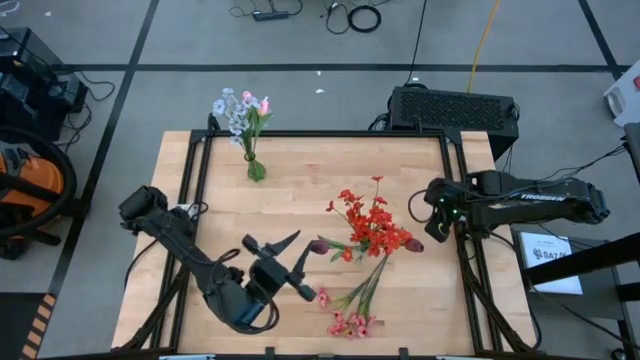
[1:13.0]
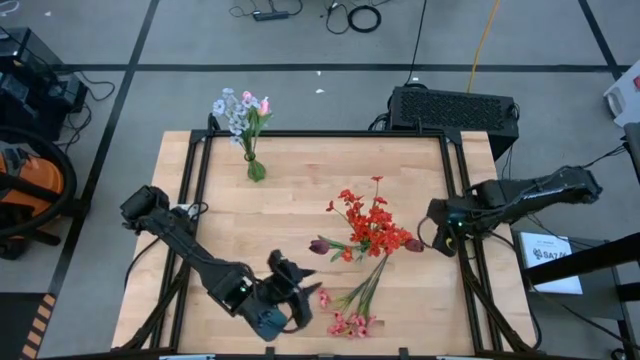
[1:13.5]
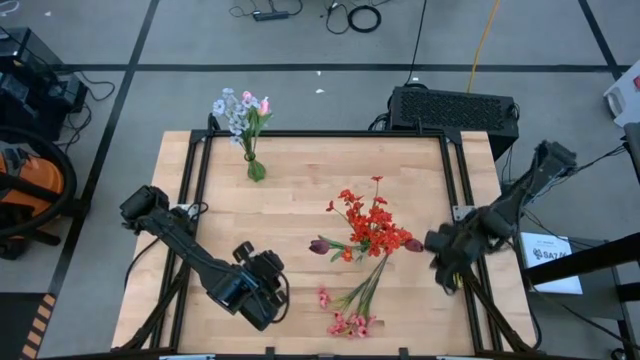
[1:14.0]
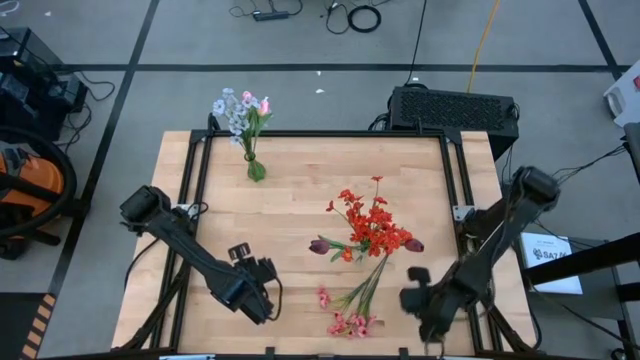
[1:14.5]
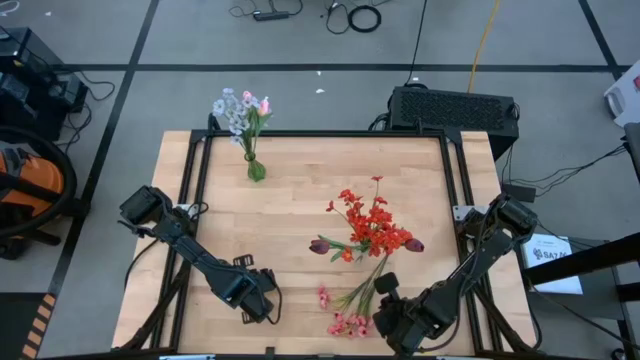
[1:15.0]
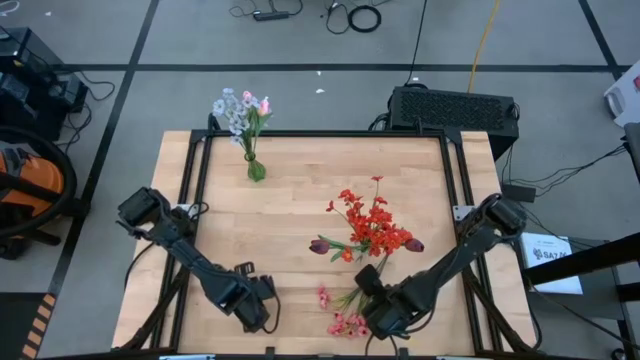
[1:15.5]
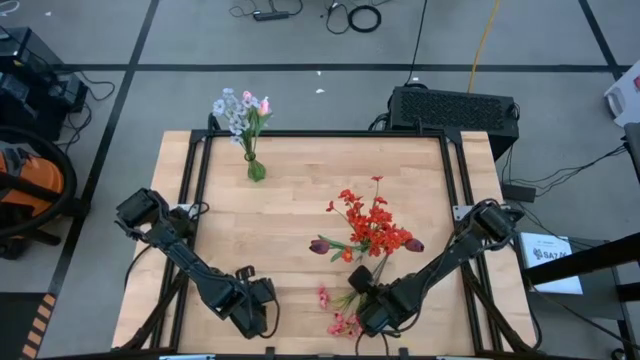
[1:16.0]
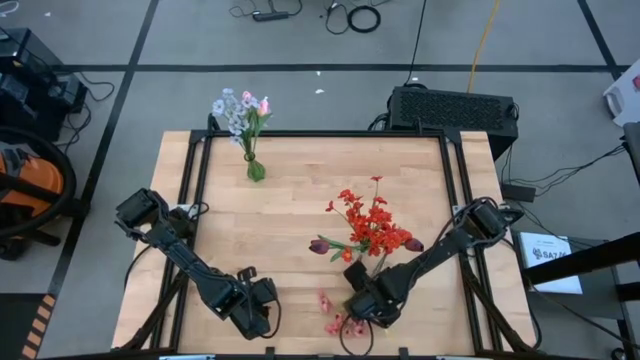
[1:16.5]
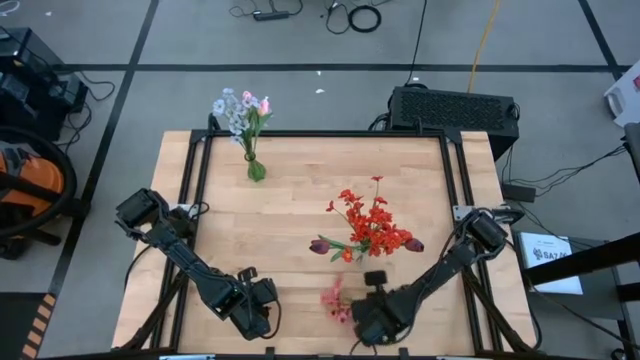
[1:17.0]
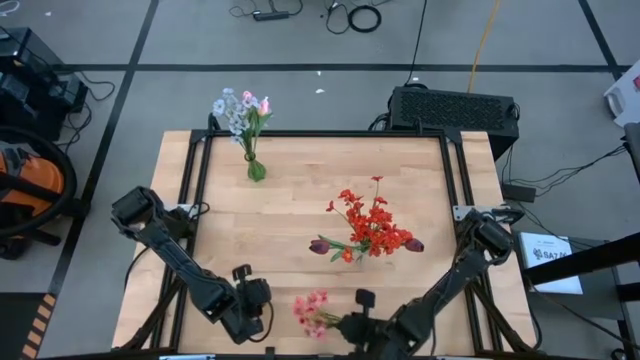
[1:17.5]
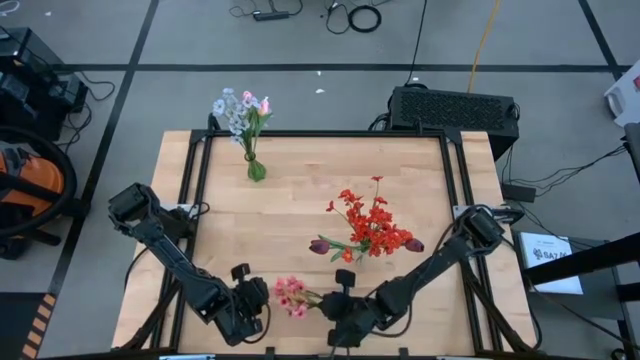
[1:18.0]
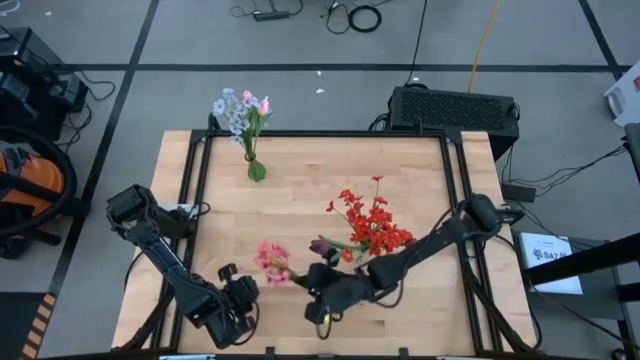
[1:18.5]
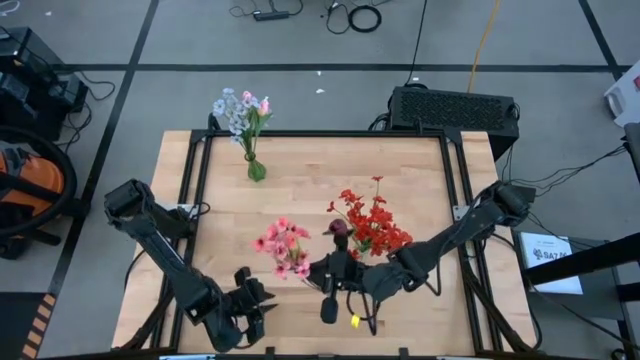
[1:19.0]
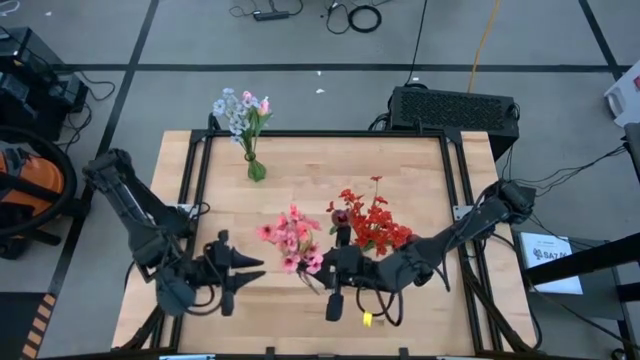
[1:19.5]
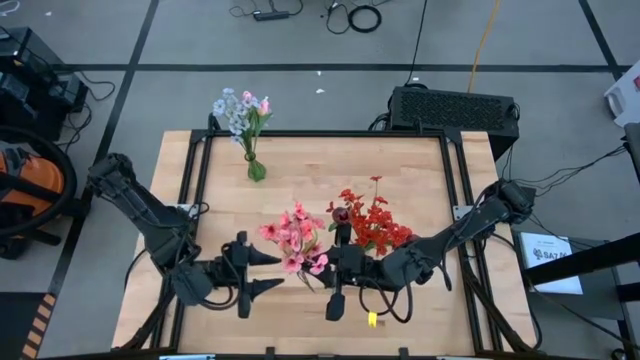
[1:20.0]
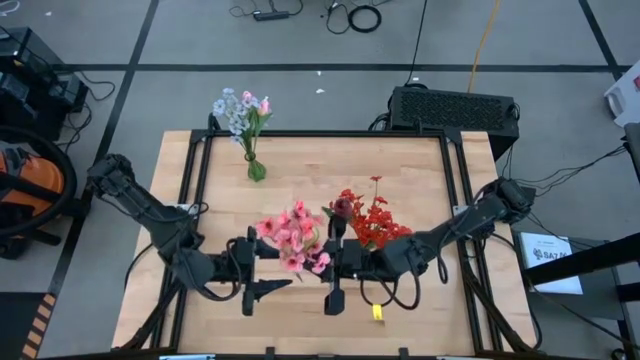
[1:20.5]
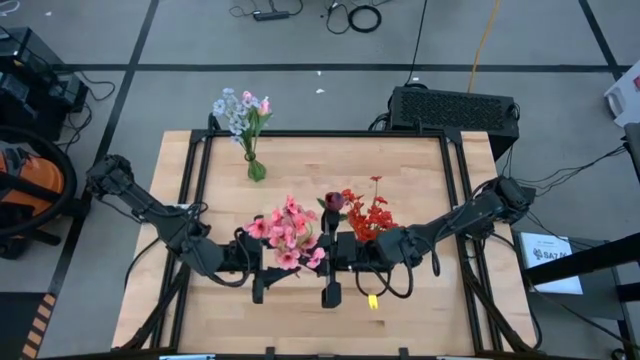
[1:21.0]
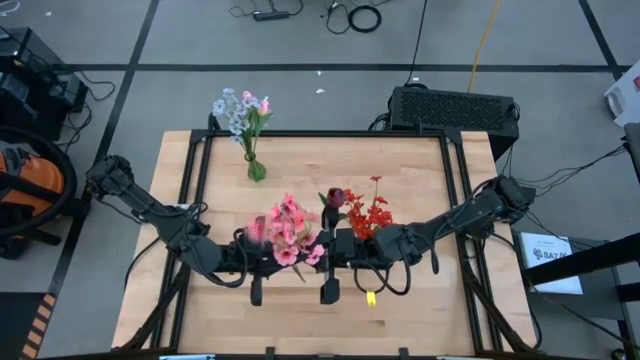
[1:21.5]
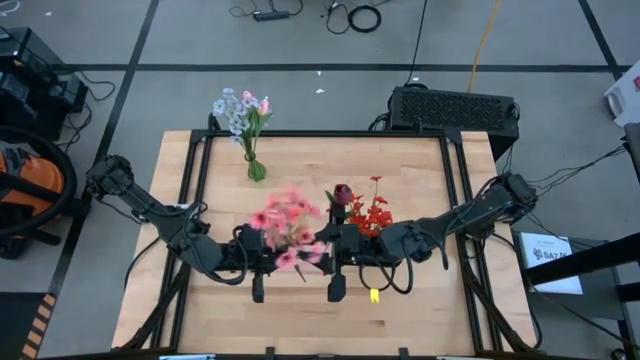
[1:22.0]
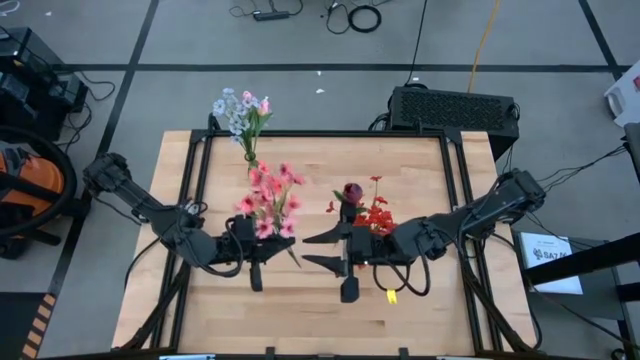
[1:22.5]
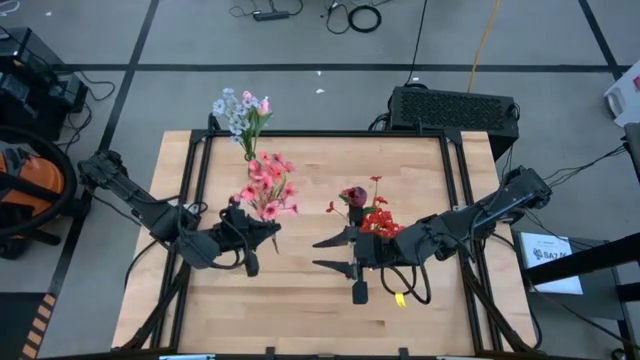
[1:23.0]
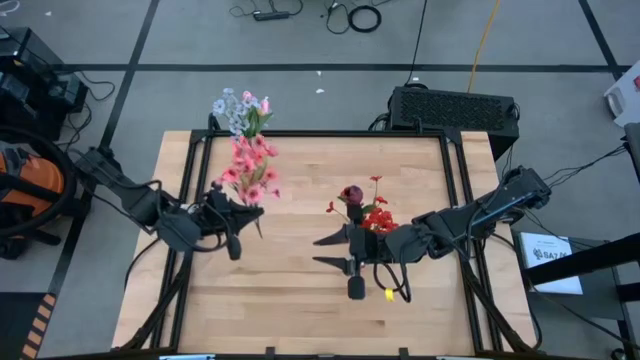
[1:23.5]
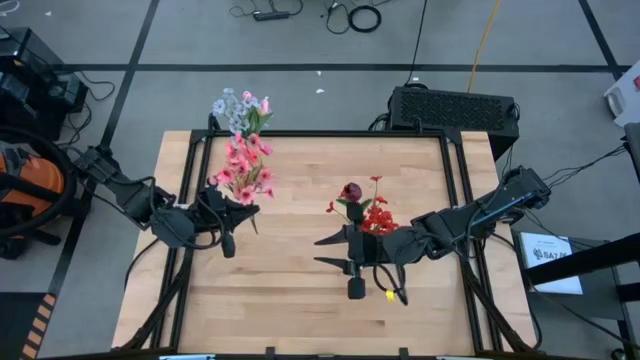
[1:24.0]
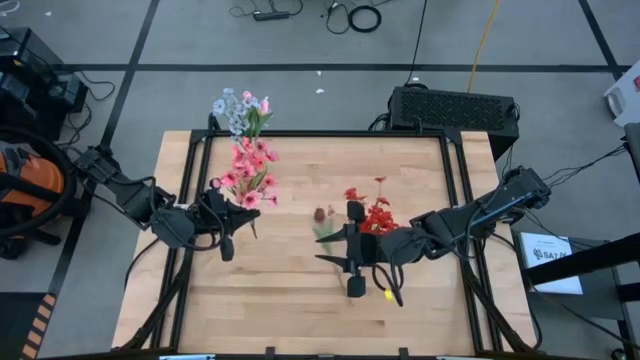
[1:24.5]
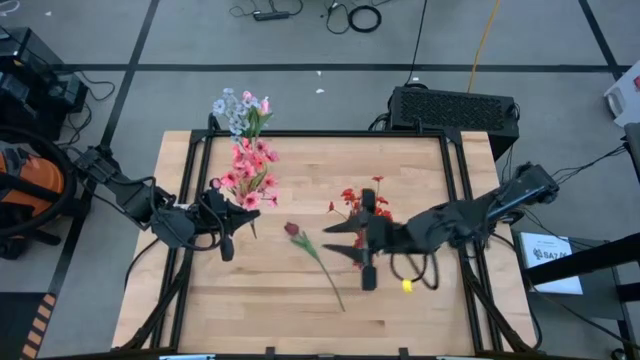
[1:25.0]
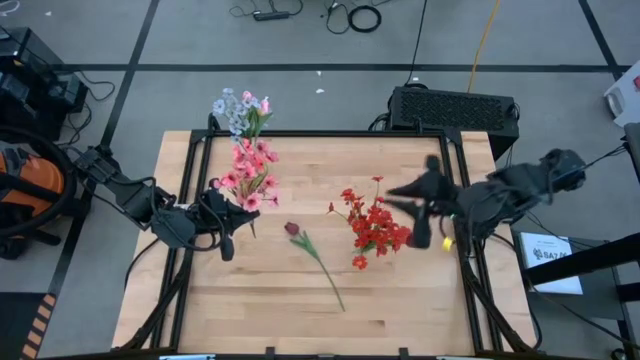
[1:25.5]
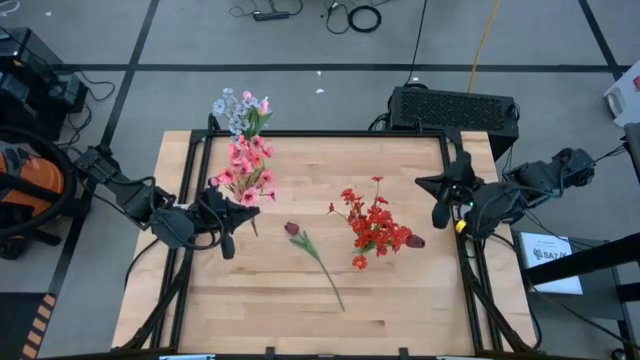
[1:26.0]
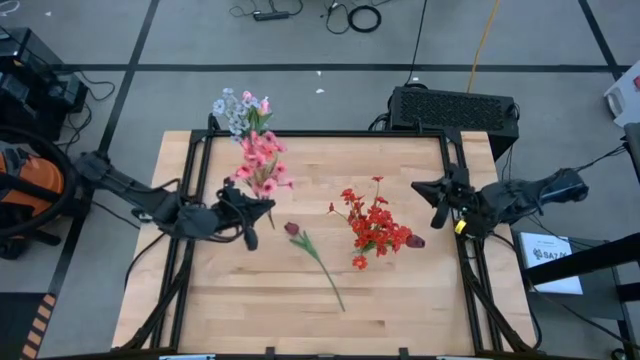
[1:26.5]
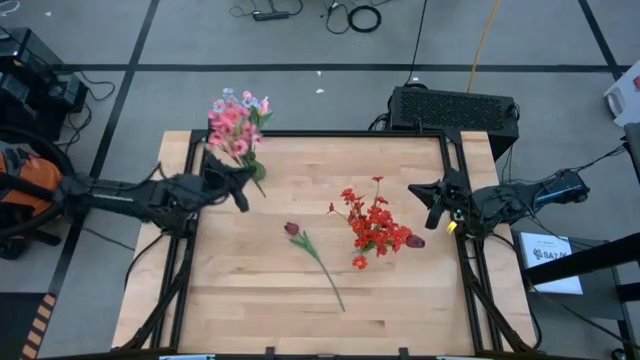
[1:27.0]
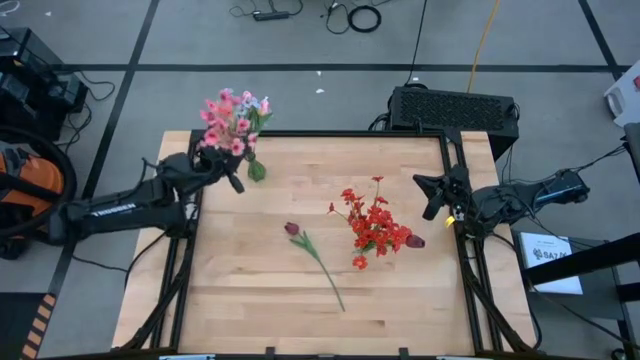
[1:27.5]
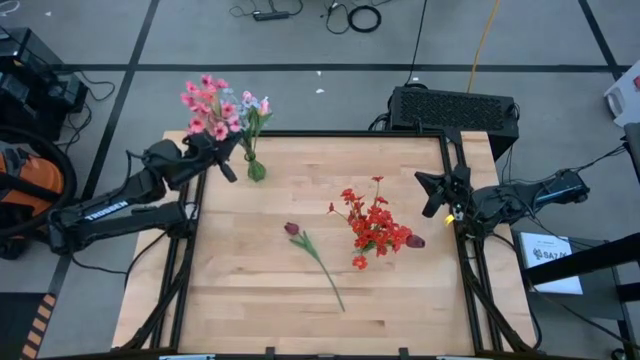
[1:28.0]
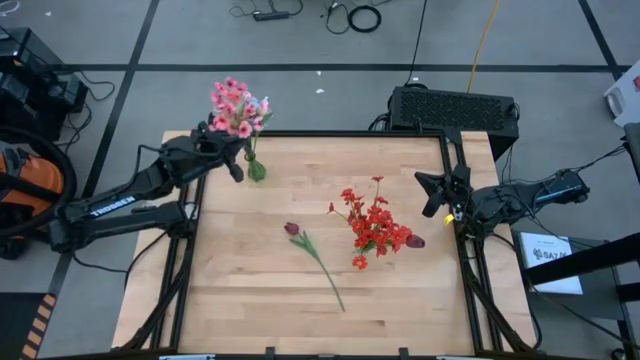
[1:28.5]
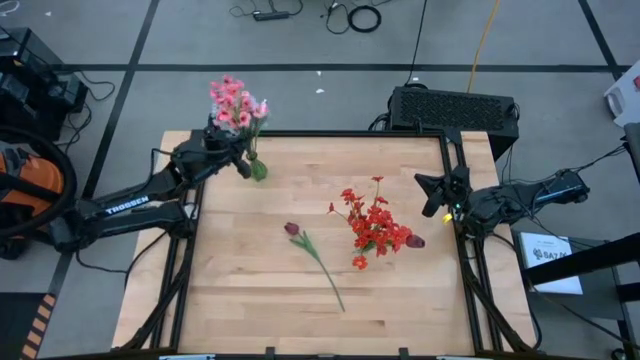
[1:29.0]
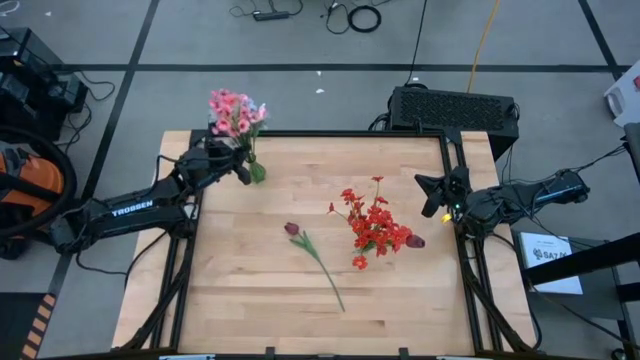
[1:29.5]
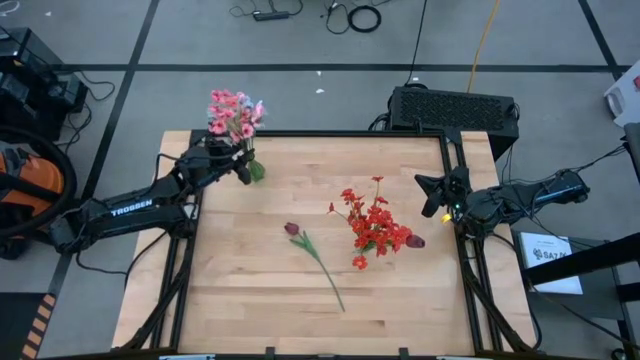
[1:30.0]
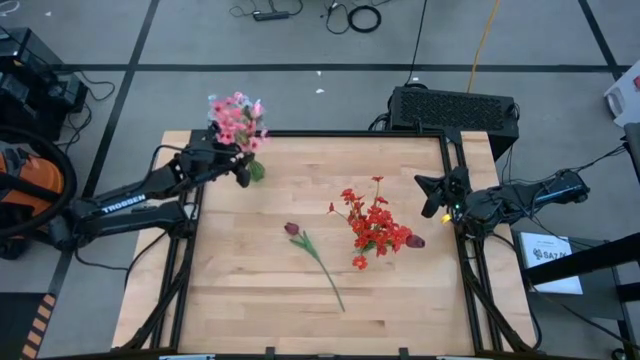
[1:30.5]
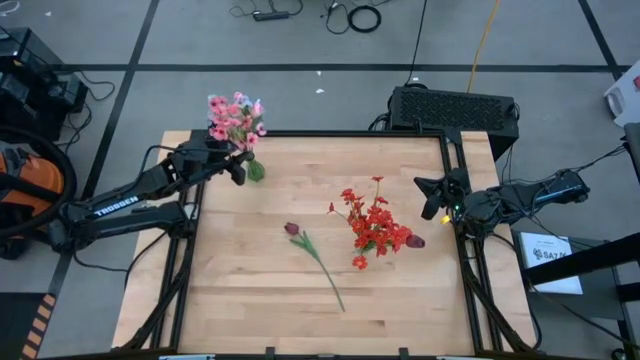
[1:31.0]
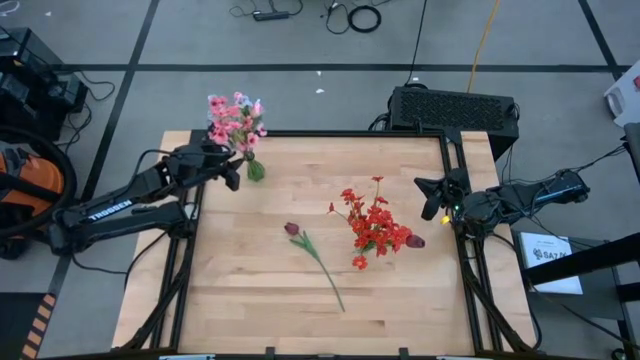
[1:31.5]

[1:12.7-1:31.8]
Task: Sort flowers into vase by color
Put the light orange flower into the green vase

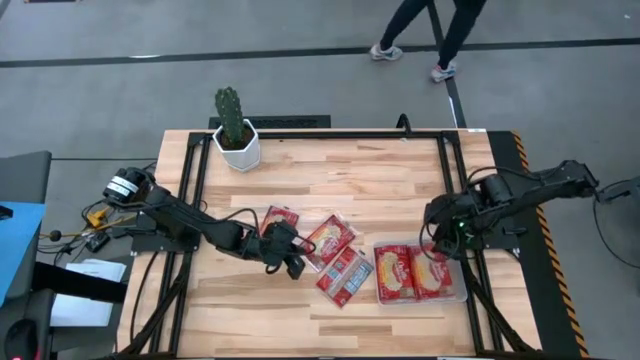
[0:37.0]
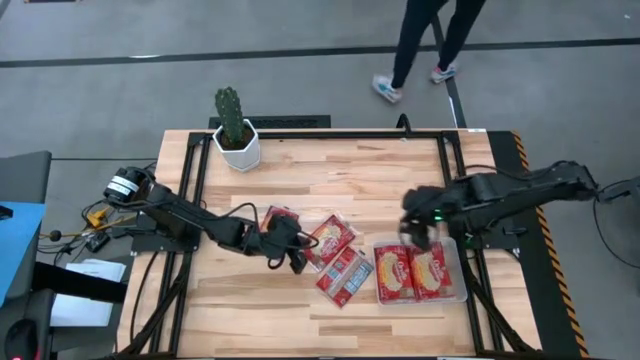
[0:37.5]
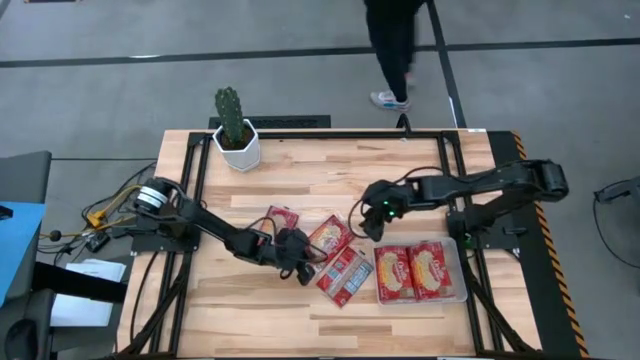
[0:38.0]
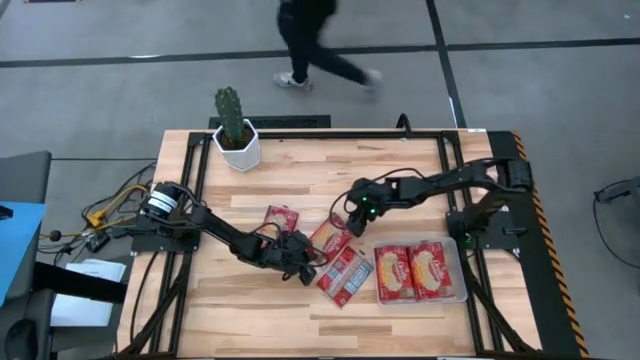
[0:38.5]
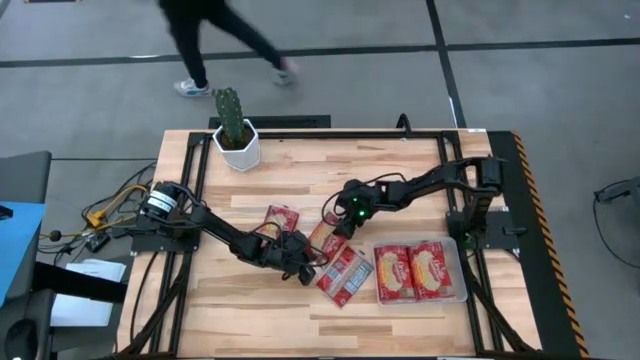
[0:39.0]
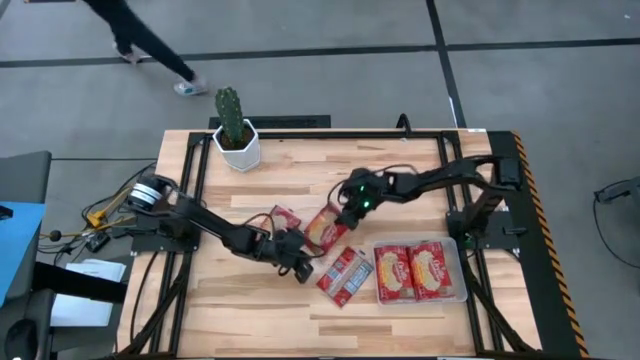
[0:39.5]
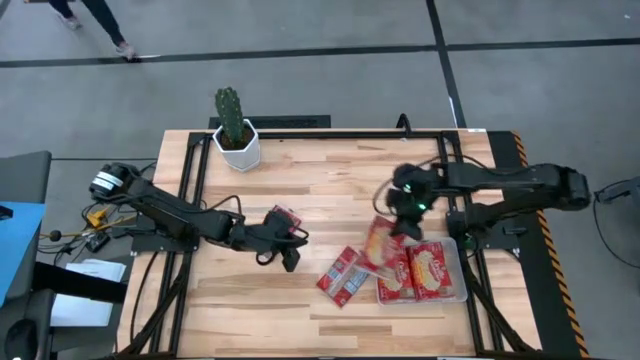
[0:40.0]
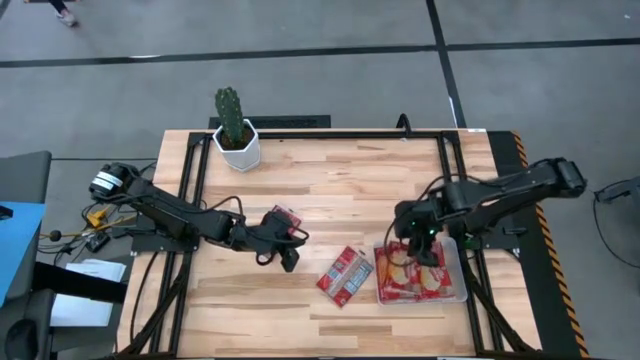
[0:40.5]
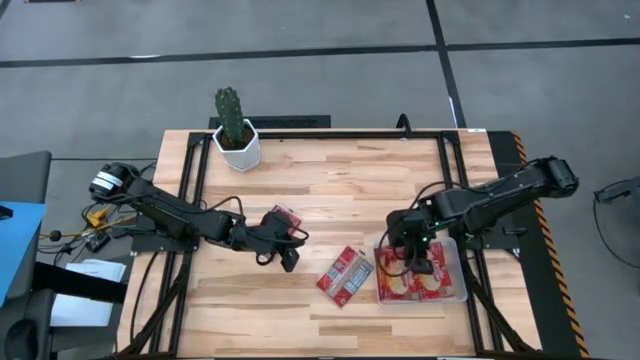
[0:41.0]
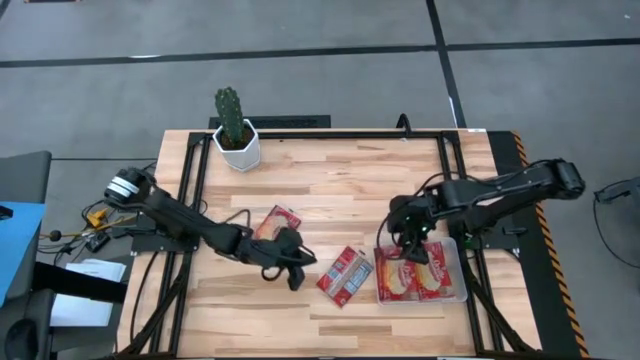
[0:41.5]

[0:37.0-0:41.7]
Task: Sort popcorn bags into baskets
Put the popcorn bag into the transparent bin
